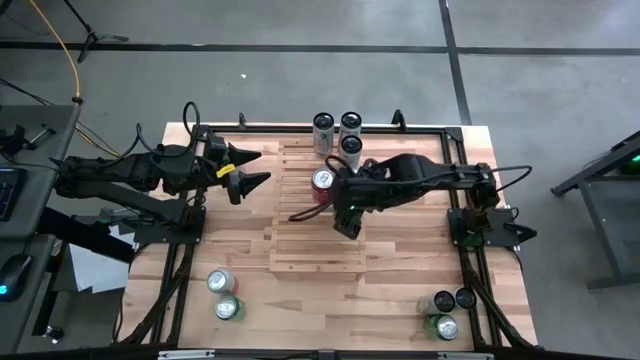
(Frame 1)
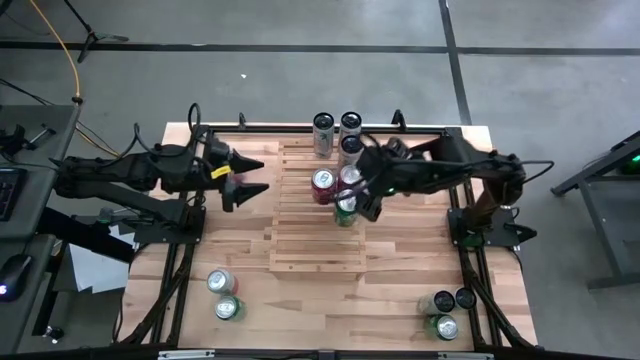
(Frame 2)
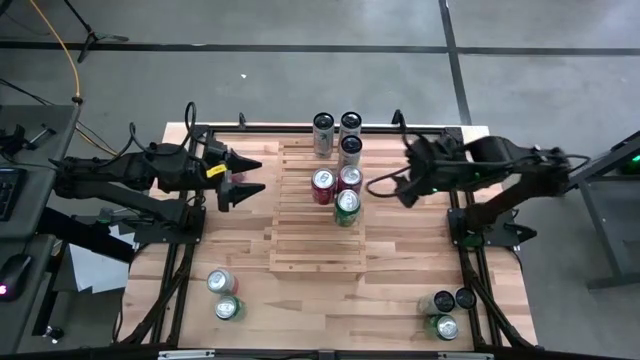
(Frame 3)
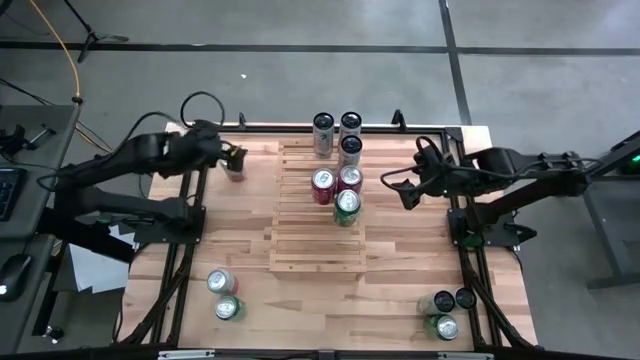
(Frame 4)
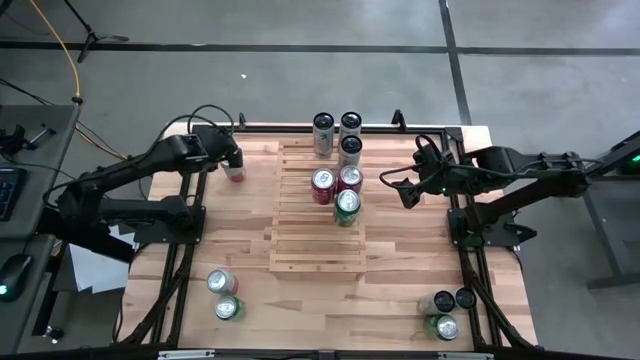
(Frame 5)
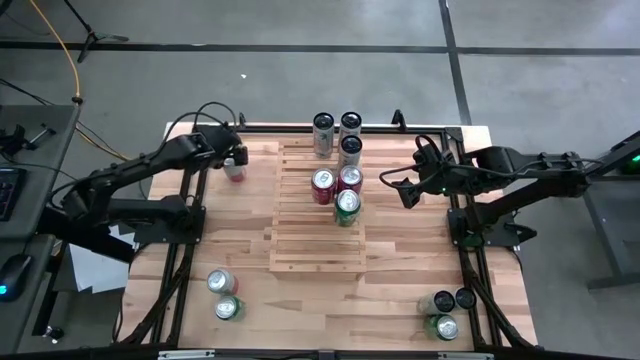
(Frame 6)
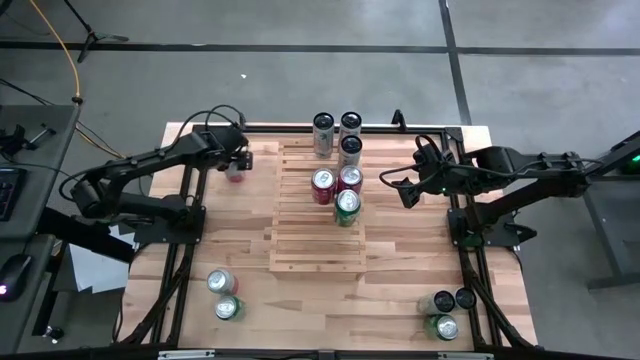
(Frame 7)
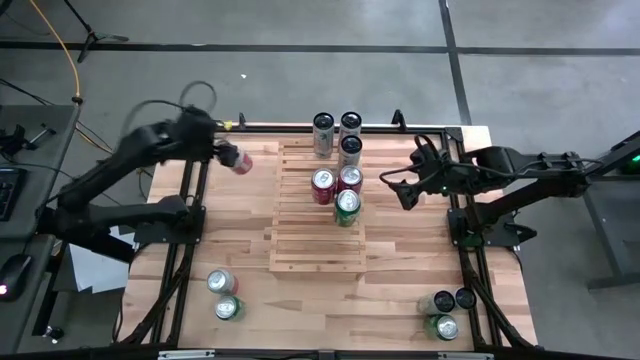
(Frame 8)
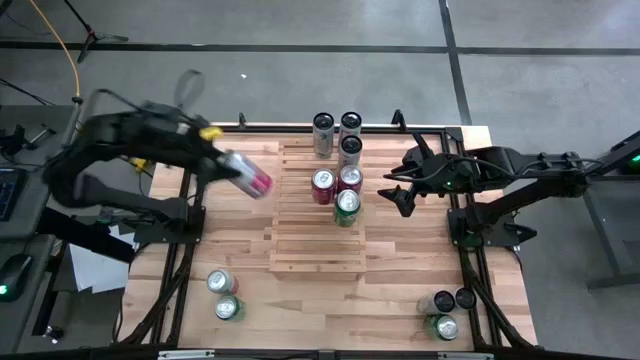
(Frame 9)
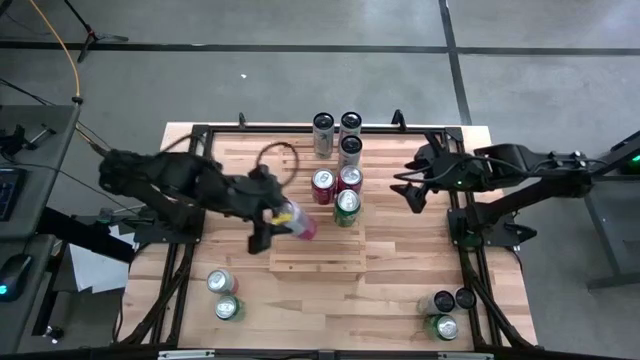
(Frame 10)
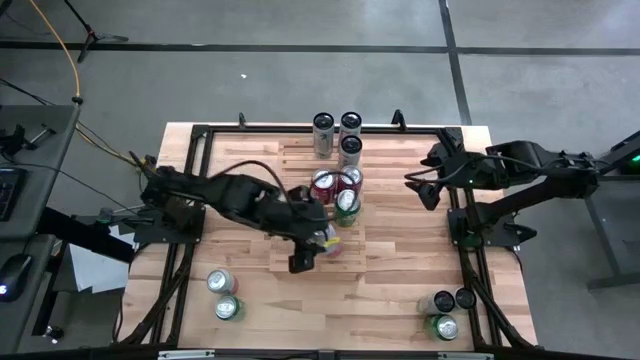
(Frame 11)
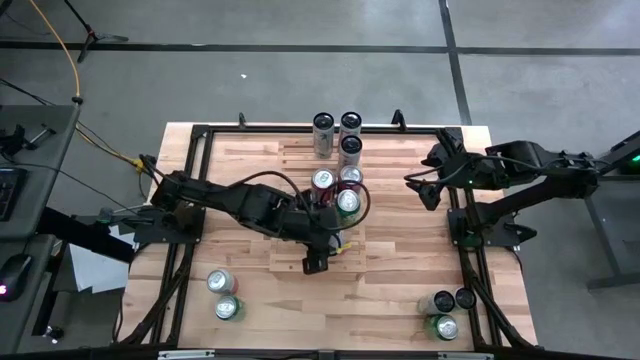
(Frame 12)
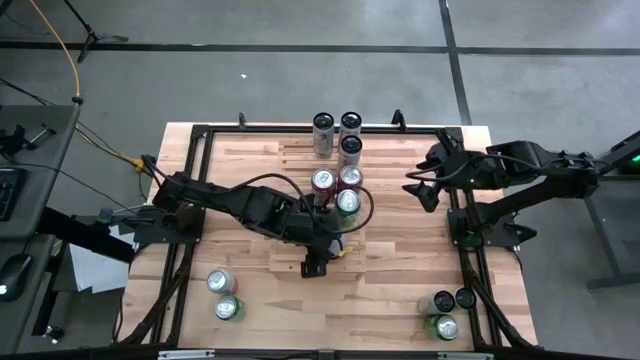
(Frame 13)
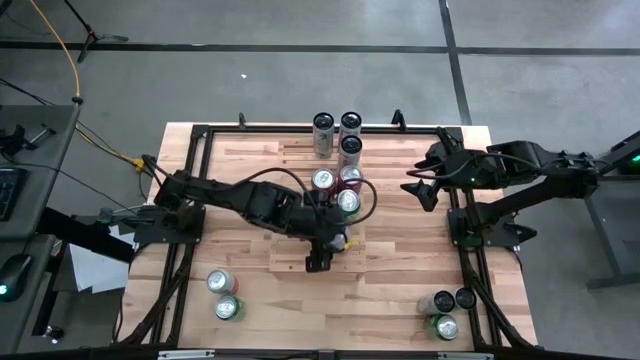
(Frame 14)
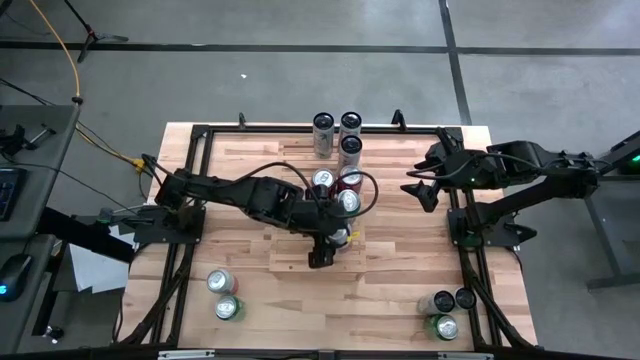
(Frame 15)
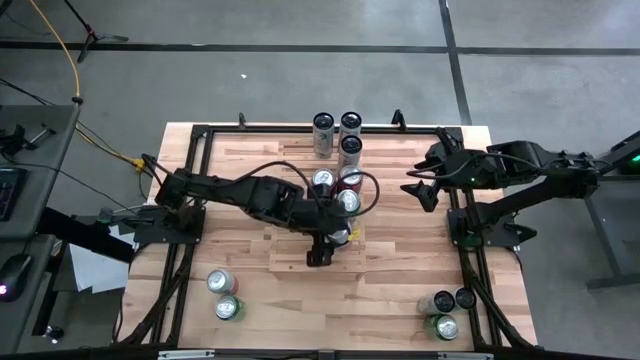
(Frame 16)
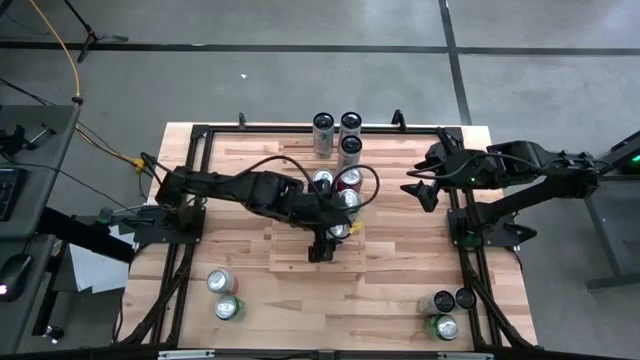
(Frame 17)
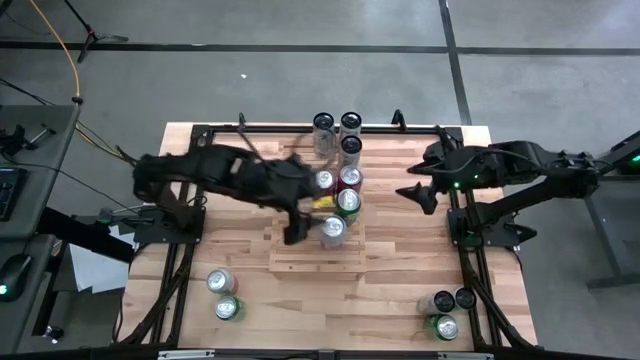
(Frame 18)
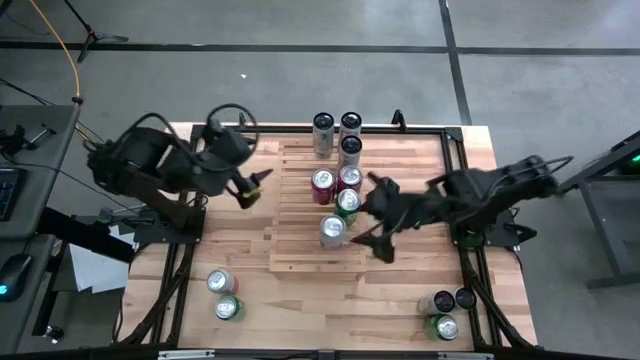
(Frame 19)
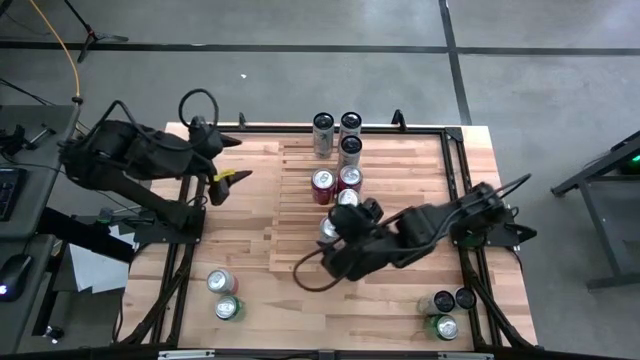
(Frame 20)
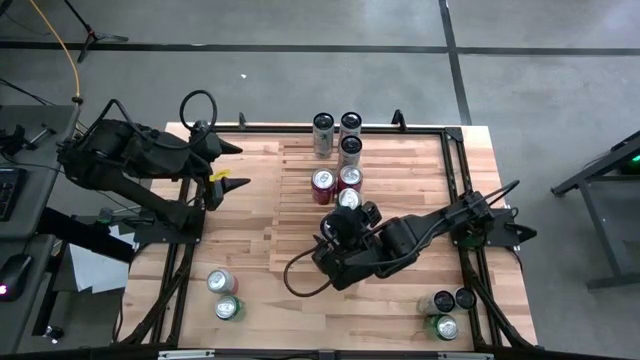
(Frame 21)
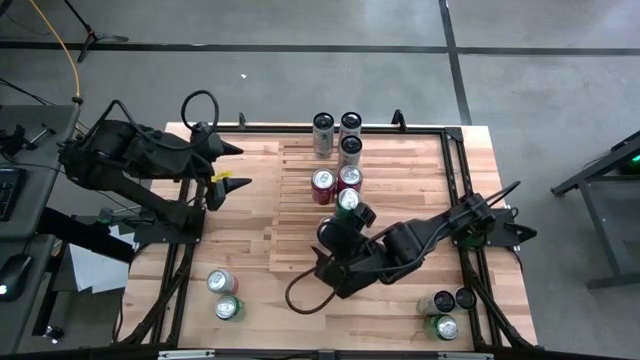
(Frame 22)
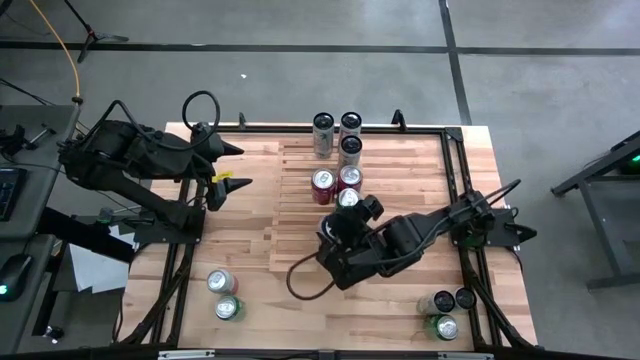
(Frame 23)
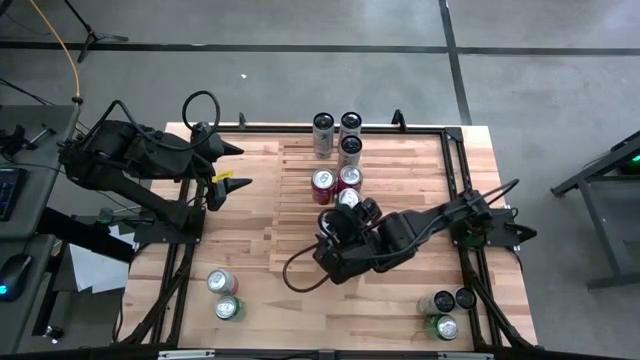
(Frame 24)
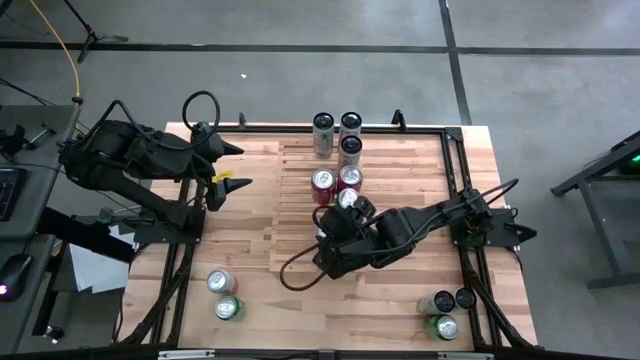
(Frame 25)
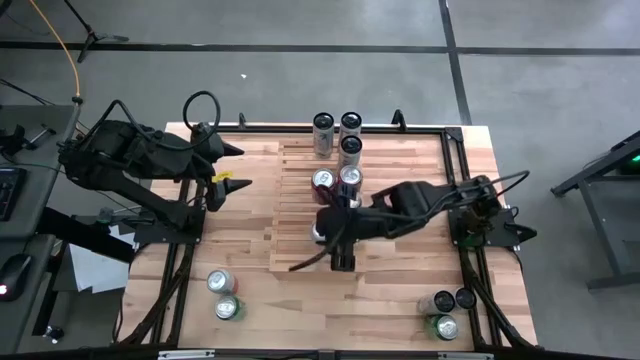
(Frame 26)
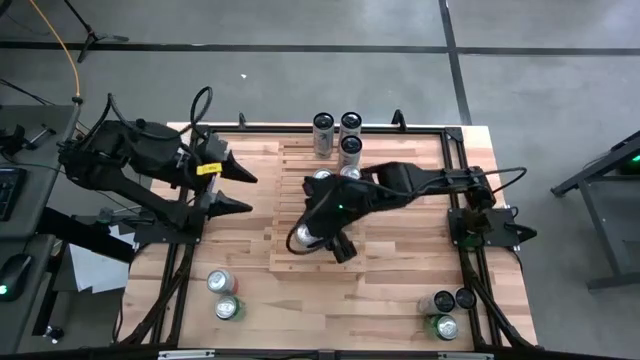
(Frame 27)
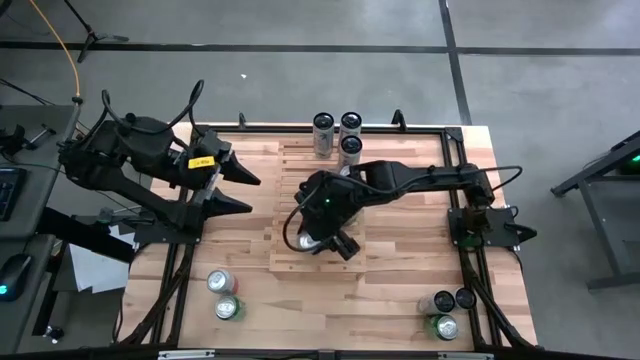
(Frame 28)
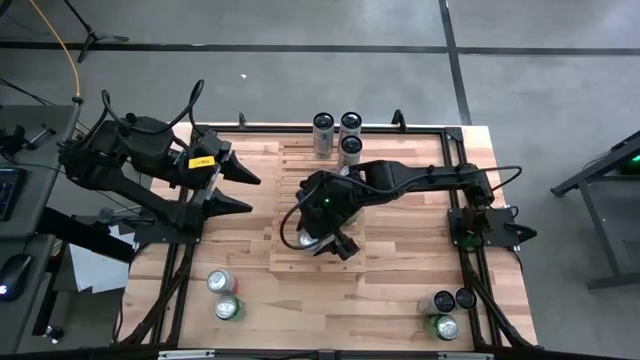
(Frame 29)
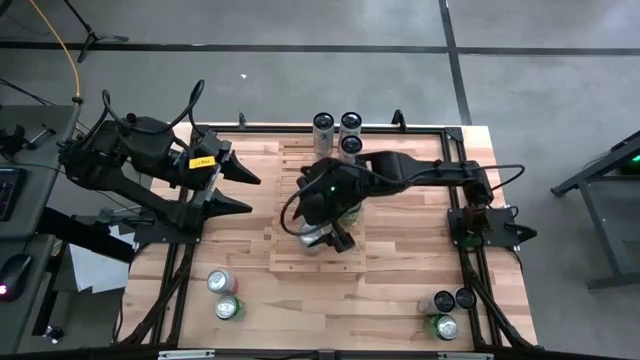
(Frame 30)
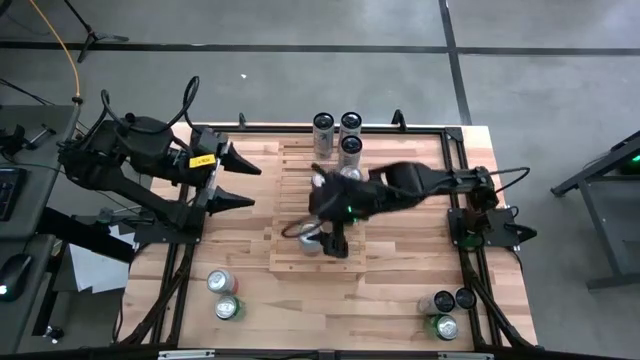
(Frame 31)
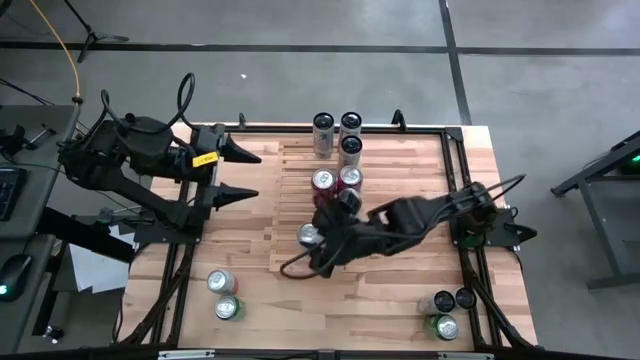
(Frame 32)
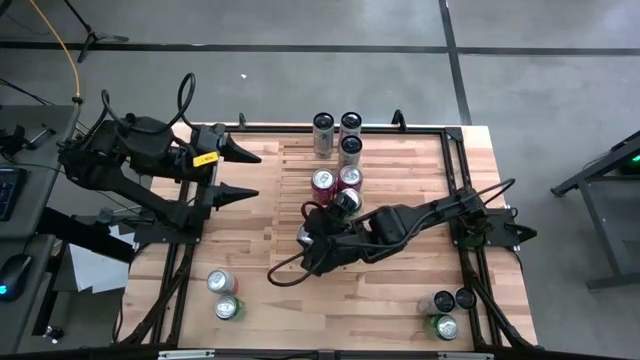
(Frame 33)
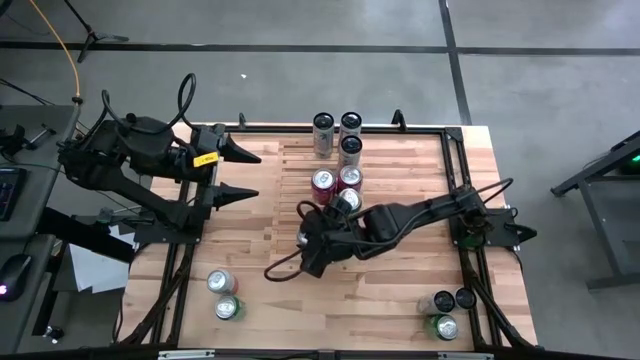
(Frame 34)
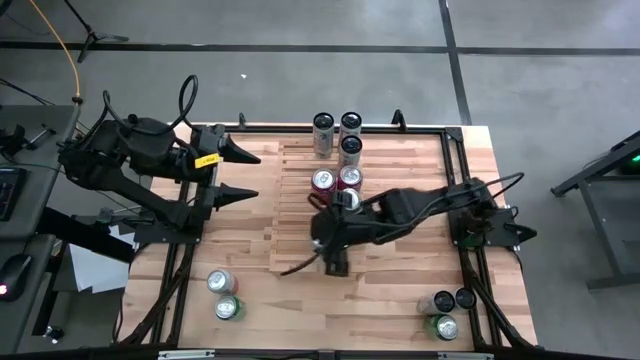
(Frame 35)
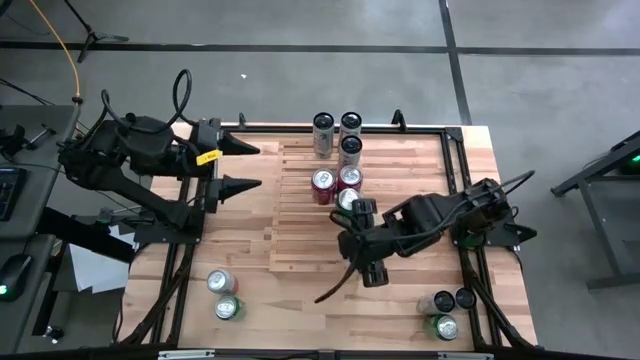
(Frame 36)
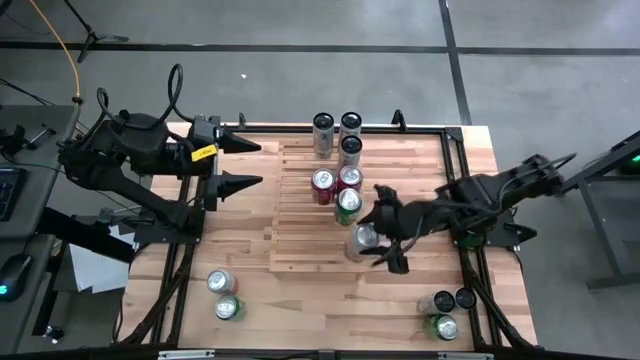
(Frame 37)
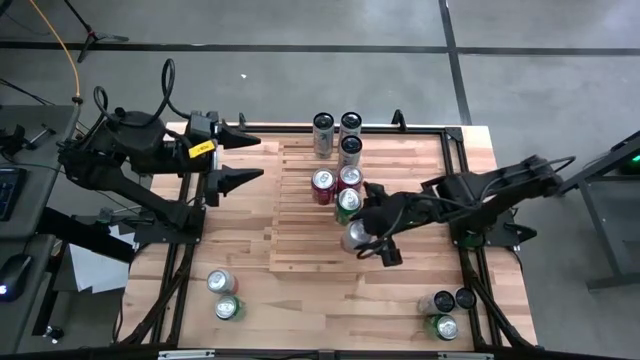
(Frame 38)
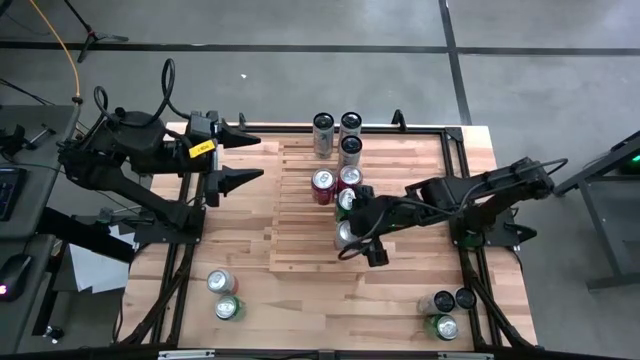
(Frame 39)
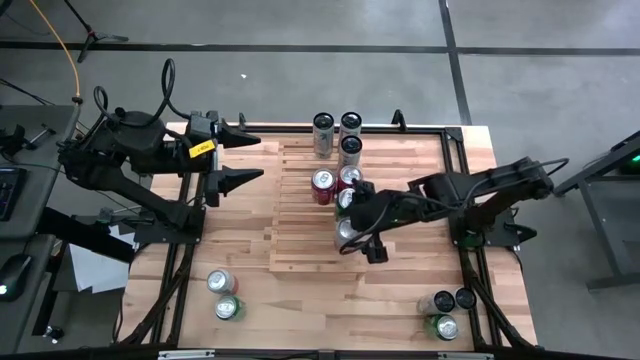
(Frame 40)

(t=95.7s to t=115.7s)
Task: Place canned beverage on shelf
Put the pink white soda can on the shelf

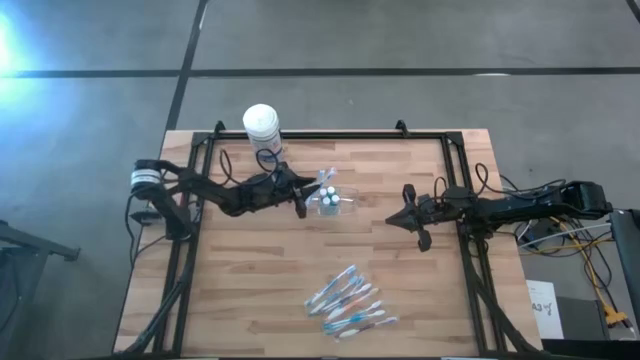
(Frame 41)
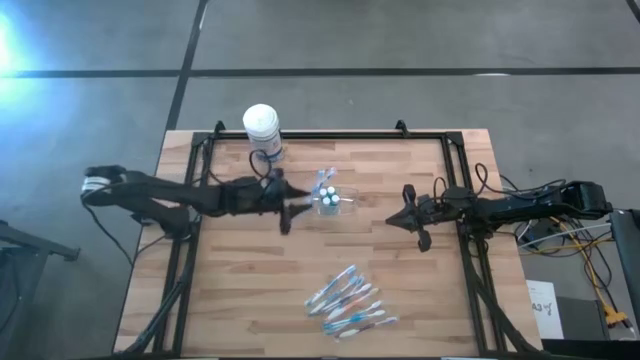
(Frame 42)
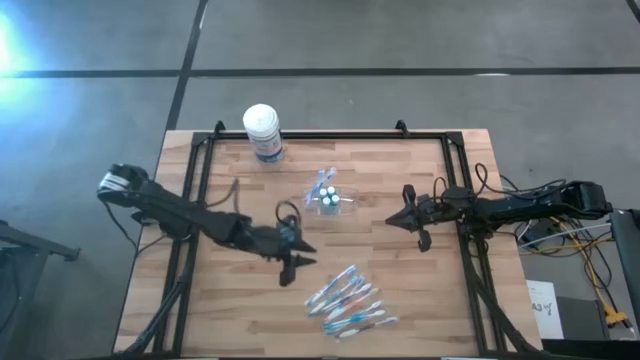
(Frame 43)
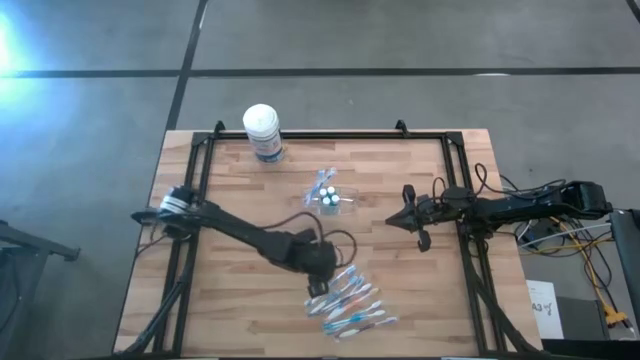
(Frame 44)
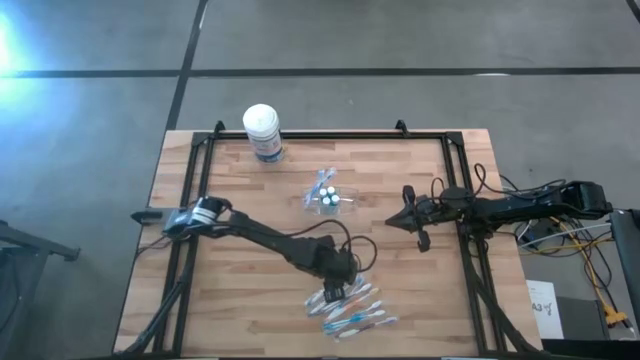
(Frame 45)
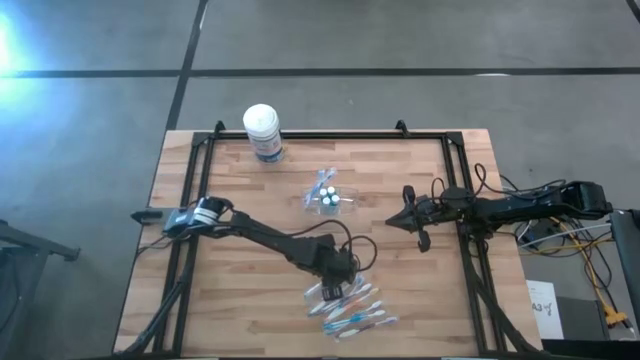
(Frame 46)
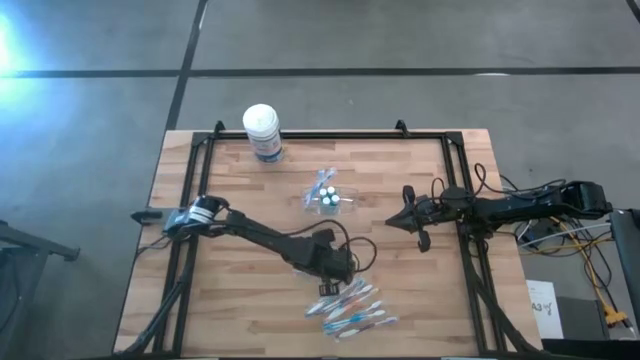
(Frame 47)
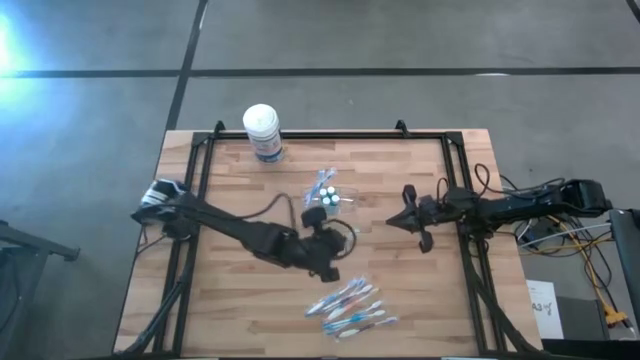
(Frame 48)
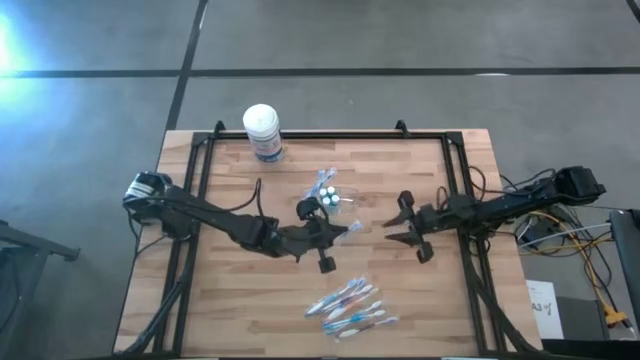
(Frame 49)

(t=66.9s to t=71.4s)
Task: Pick & Place toothbrushing station
Put the blue toothbrush into the transparent organizer
